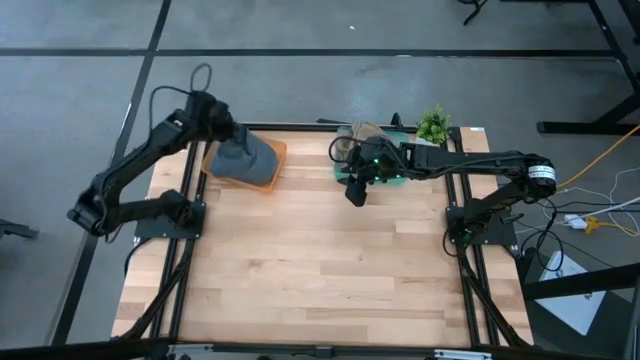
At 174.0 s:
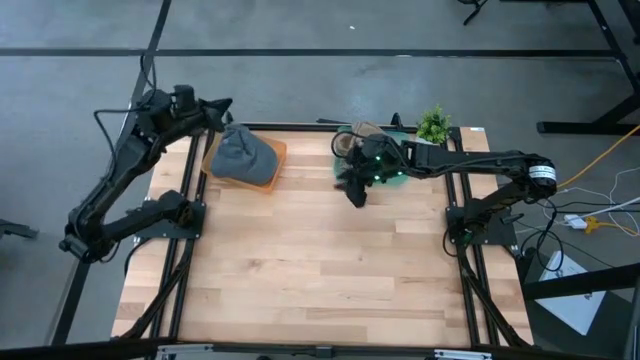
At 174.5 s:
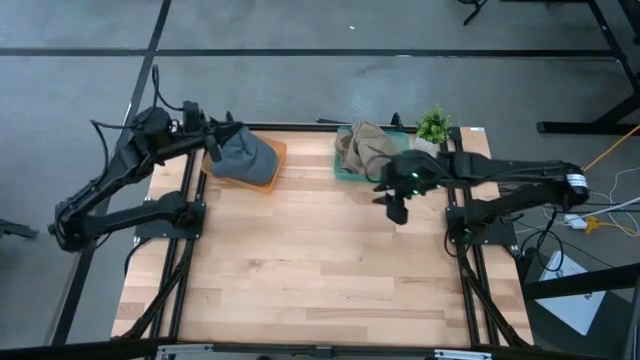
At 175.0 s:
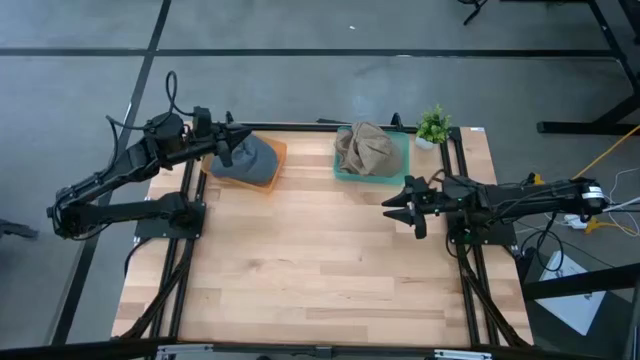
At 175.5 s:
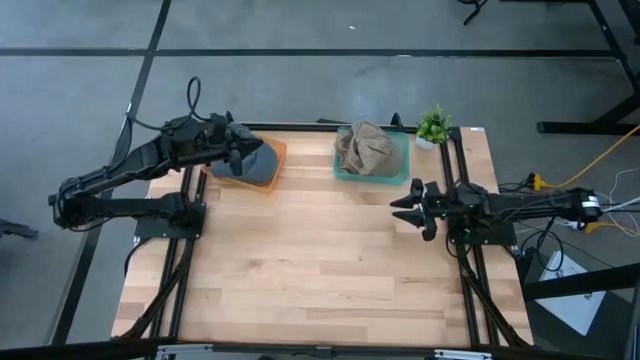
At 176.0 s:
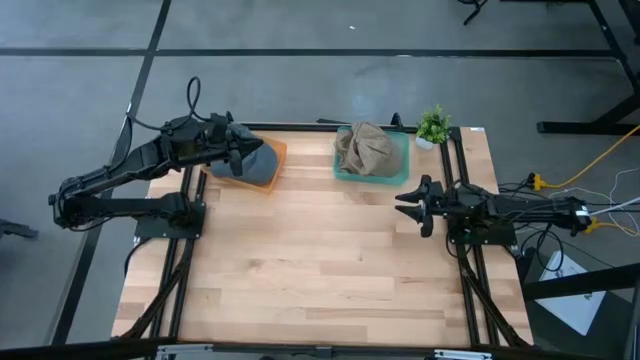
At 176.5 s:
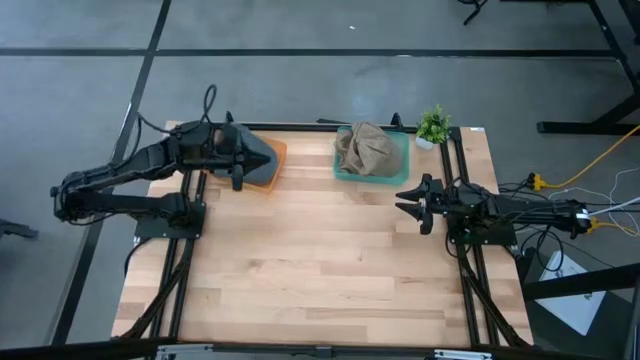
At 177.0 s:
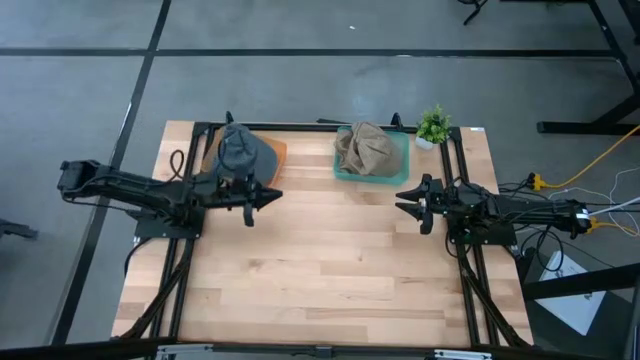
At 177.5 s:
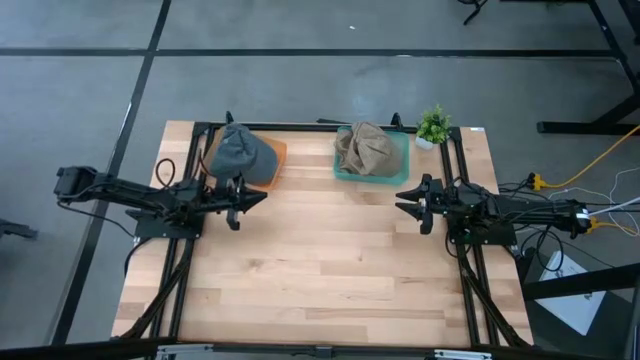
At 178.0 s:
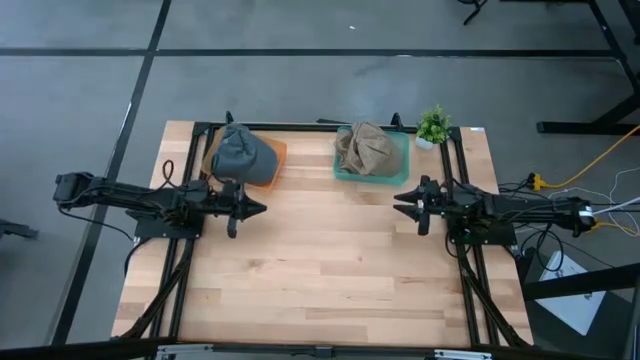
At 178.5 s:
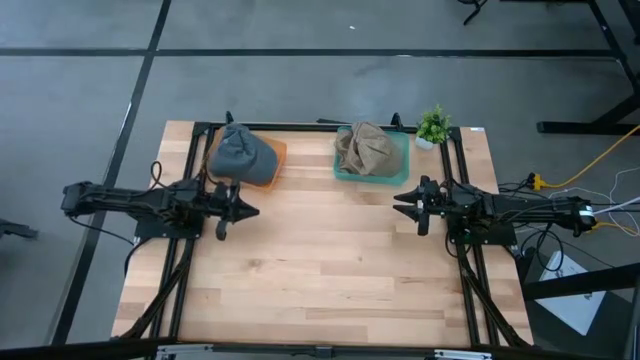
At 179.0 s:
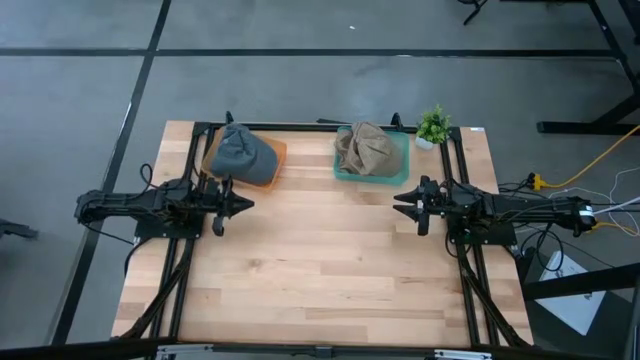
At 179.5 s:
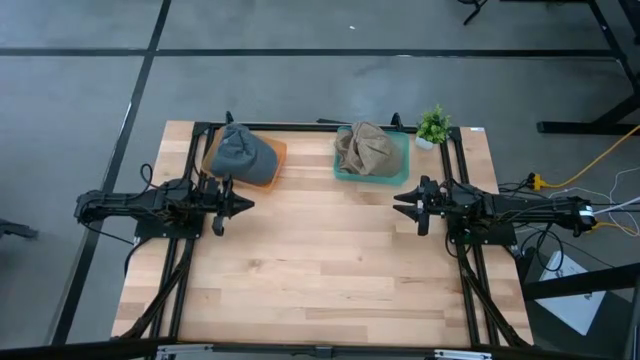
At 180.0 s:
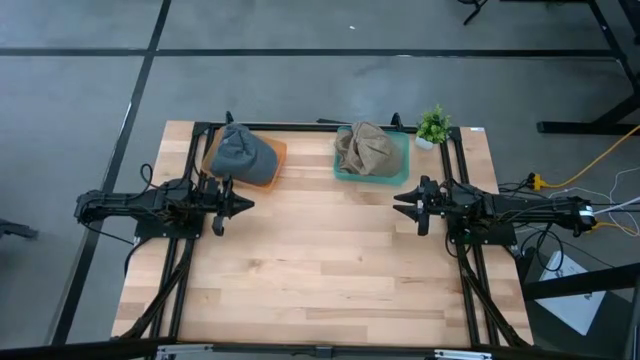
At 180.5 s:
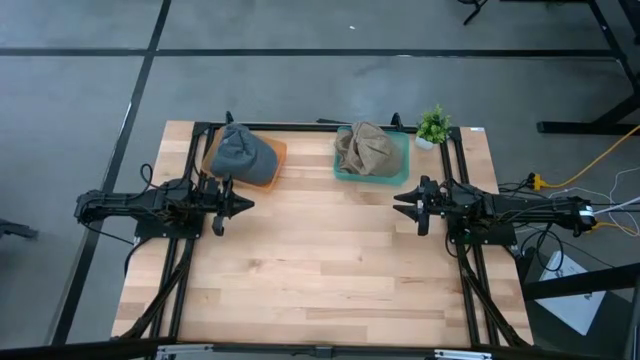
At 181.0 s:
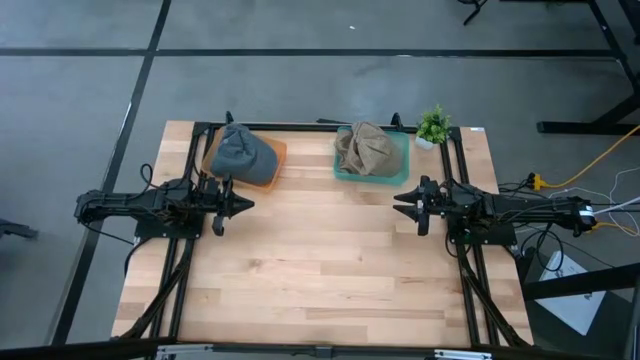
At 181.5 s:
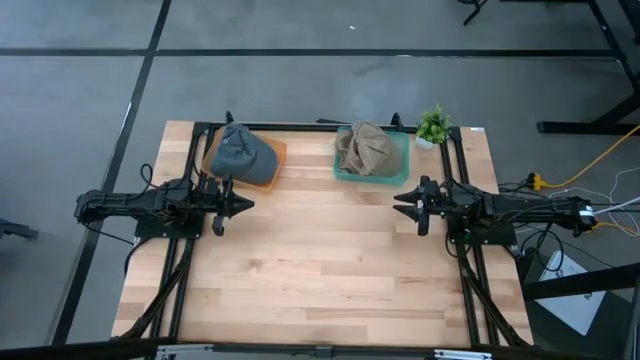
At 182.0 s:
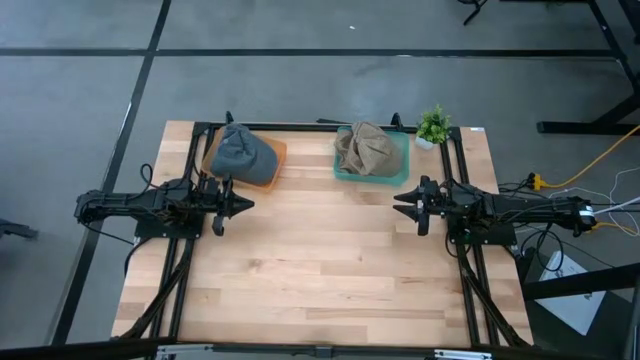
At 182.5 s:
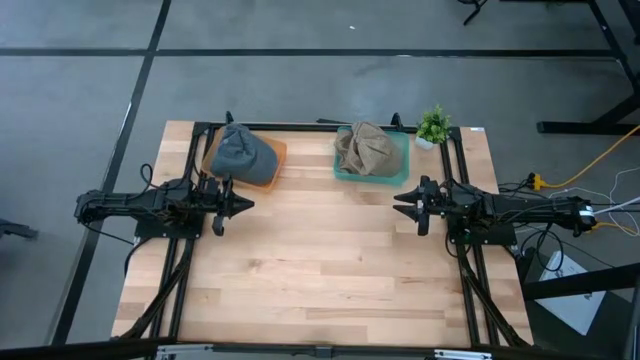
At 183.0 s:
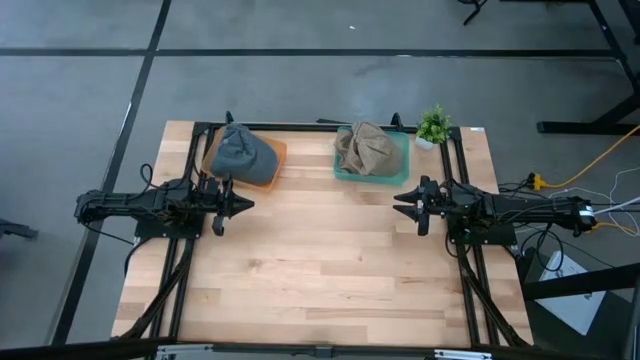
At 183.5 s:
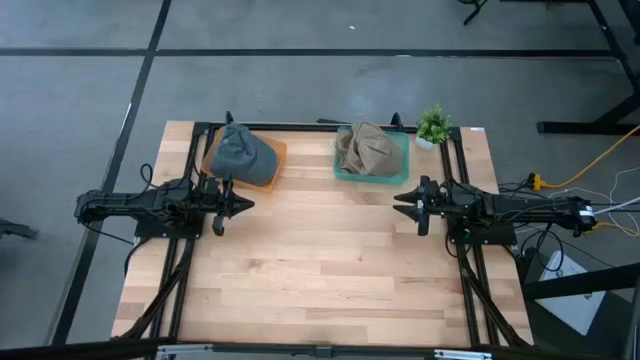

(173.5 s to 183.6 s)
Task: Pick & Place hat
Return to Home Position

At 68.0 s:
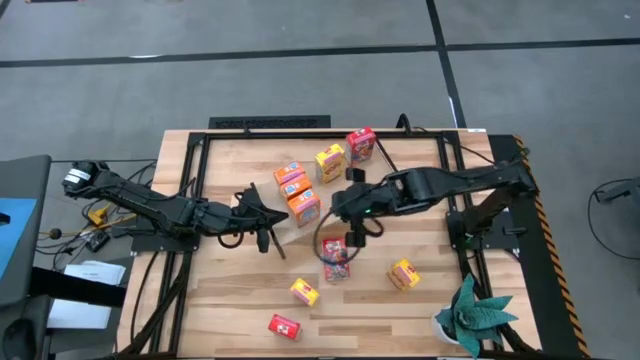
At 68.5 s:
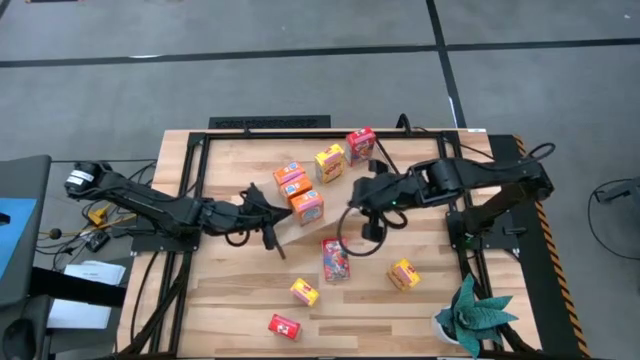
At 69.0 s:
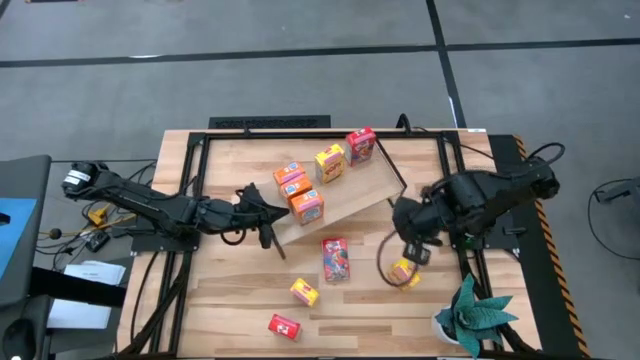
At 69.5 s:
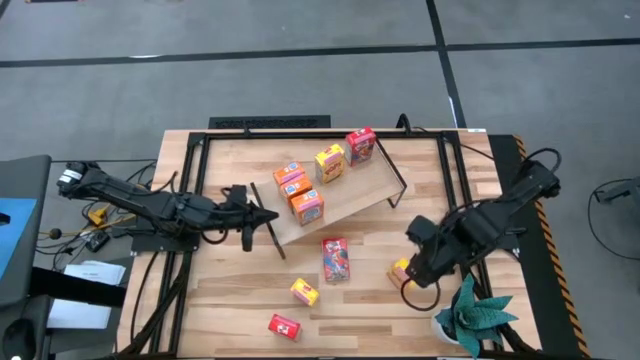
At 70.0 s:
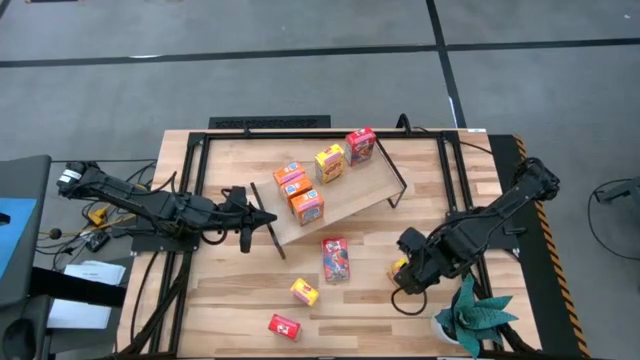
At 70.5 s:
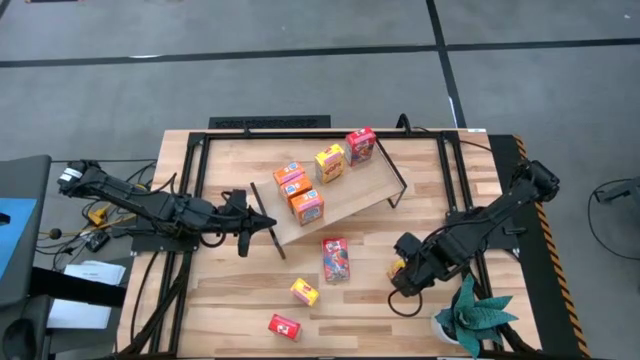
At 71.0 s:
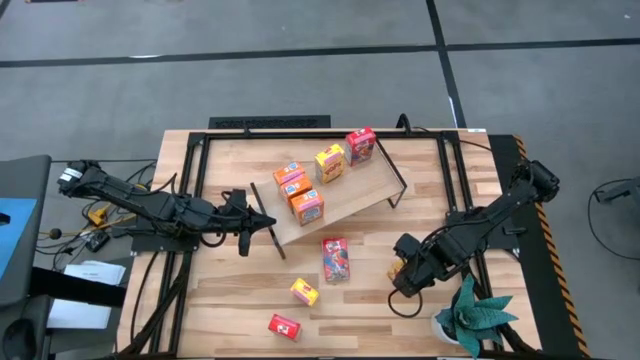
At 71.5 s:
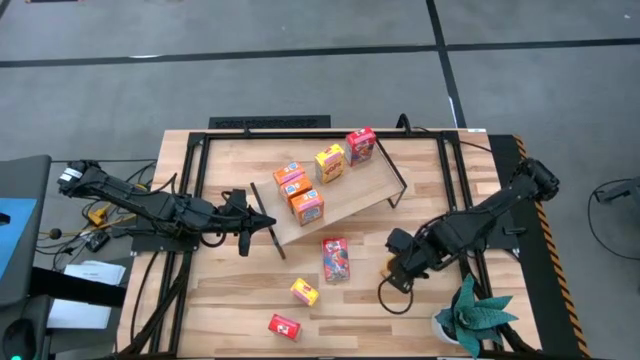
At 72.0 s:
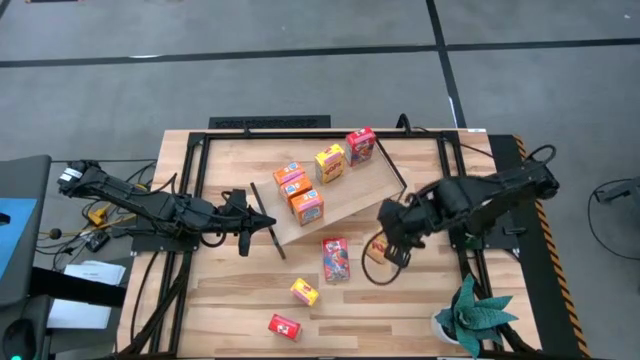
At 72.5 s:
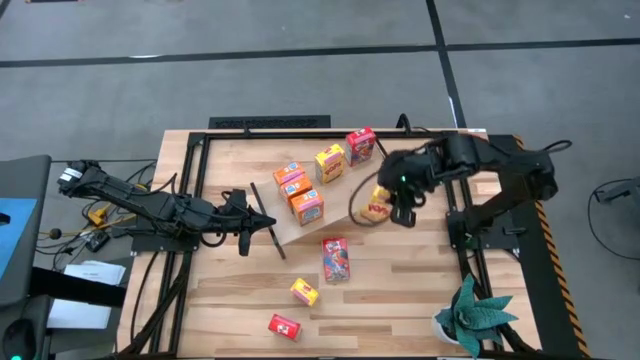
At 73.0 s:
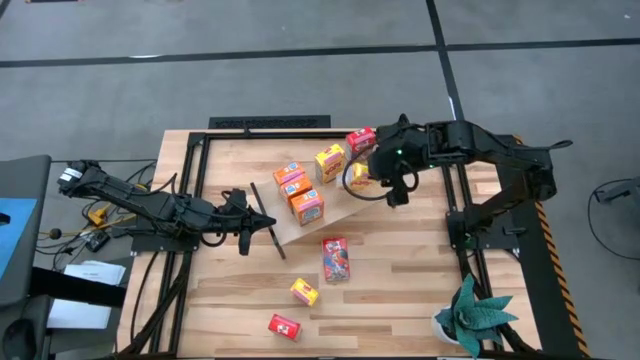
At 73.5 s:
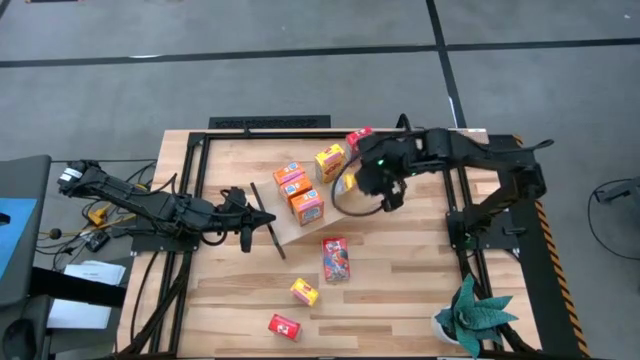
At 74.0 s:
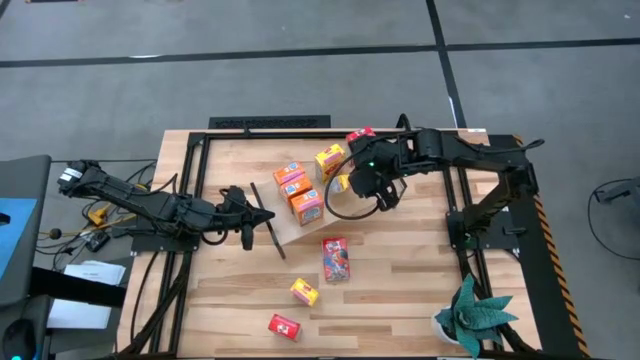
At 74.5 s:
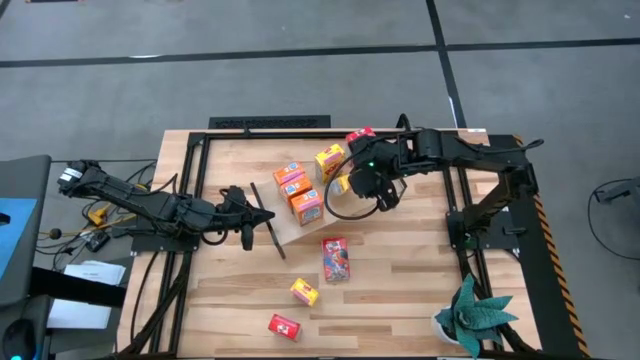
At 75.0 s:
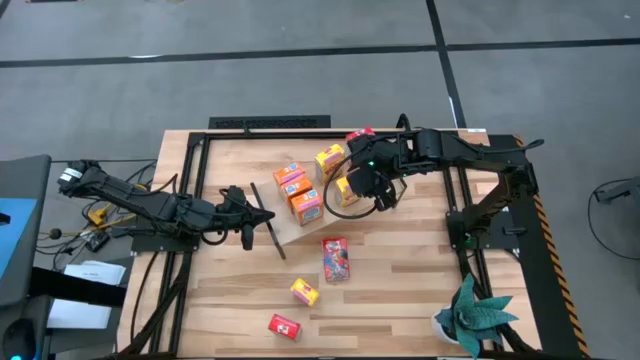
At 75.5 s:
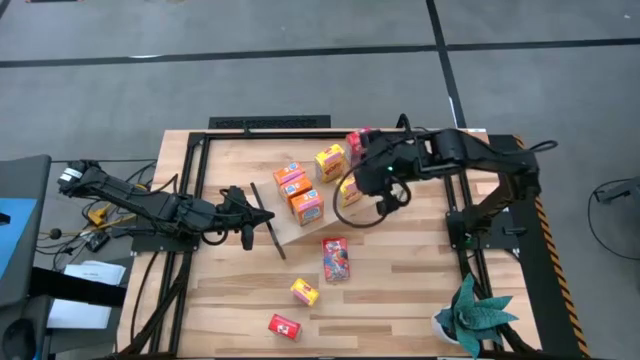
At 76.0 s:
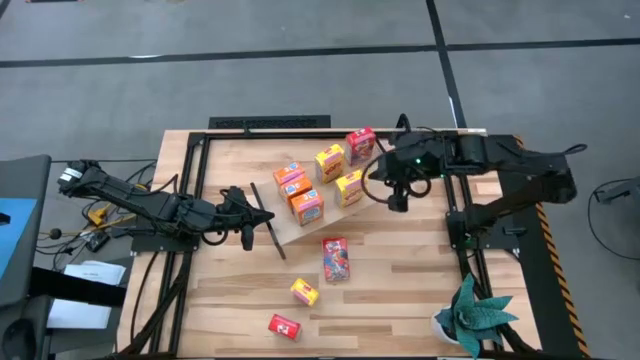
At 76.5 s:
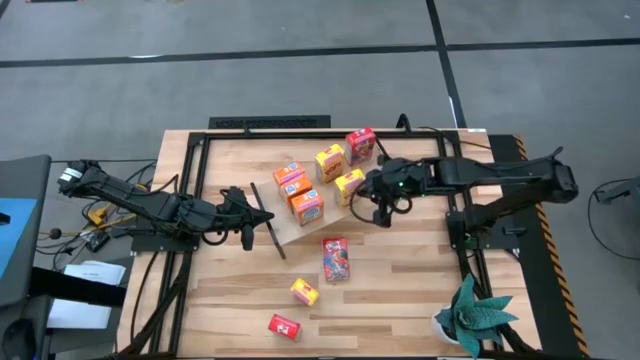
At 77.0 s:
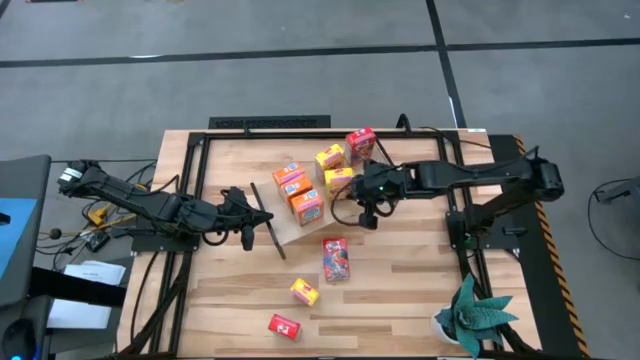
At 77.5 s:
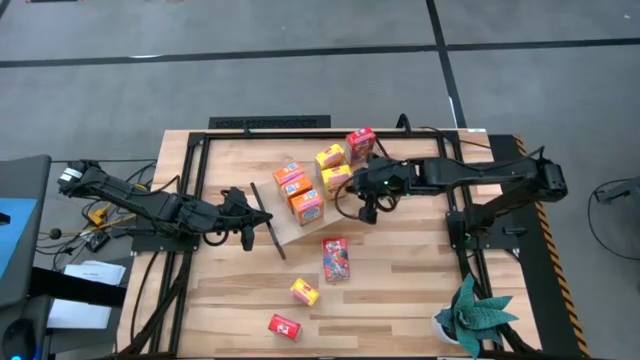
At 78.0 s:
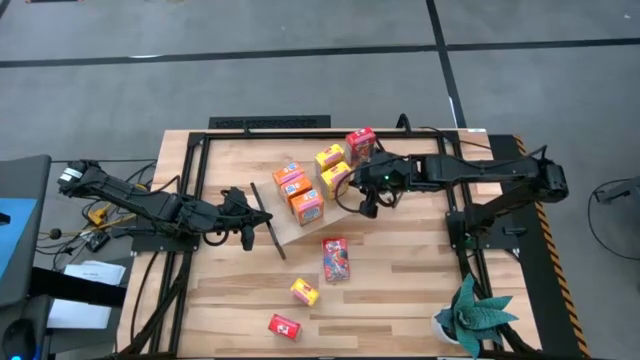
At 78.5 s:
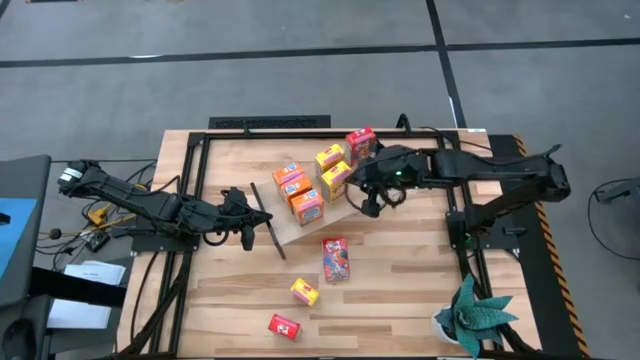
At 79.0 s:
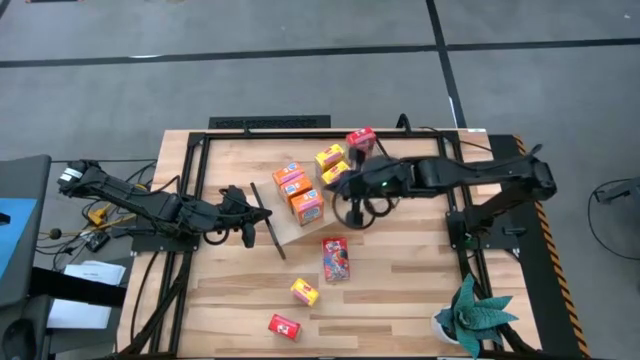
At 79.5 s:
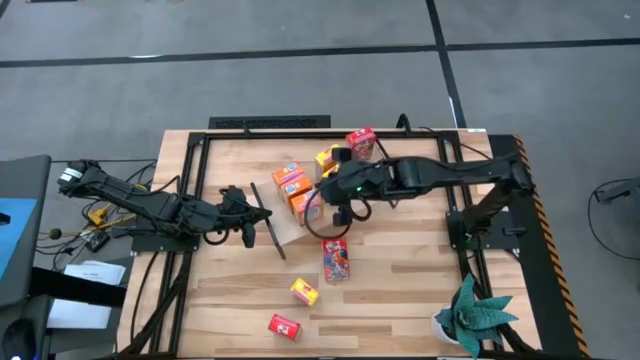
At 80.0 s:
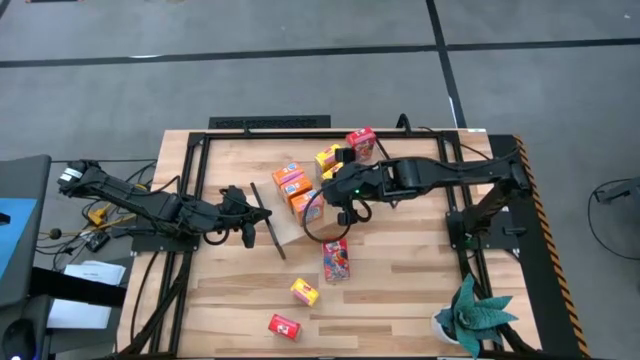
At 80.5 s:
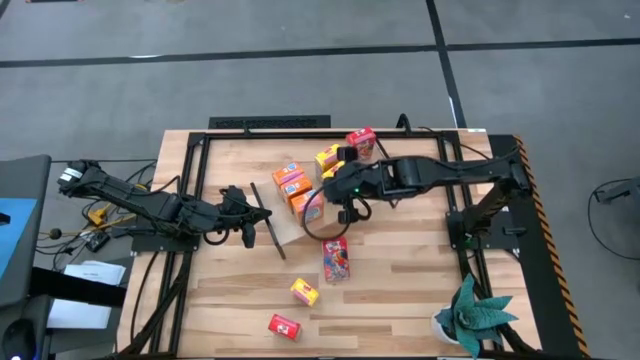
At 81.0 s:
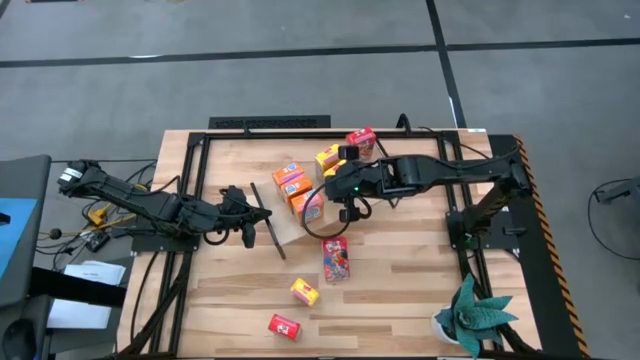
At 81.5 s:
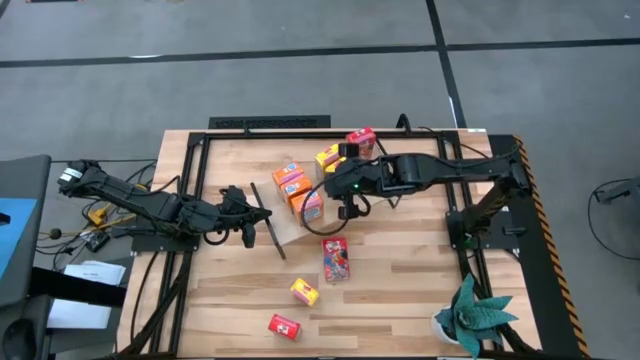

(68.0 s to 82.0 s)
Task: Stack cereal on shelf
Put the right yellow cereal box on the shelf aligned with the other yellow cereal box
